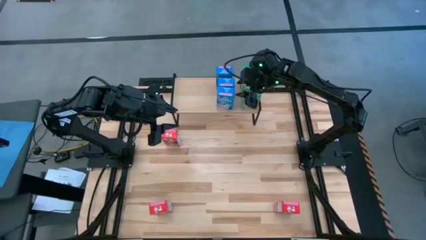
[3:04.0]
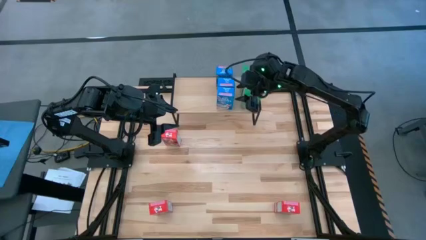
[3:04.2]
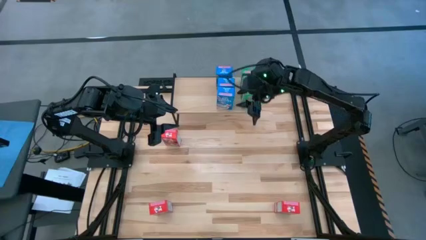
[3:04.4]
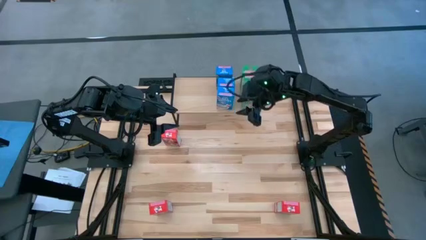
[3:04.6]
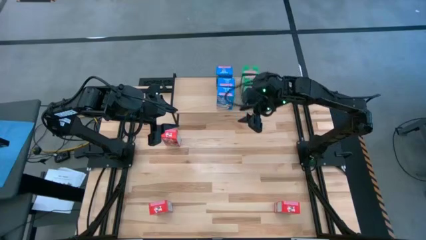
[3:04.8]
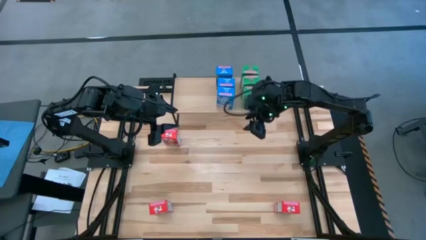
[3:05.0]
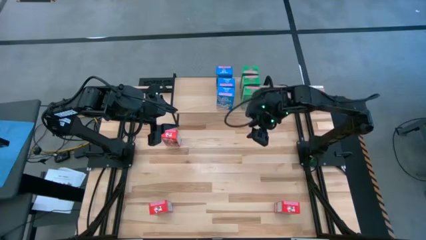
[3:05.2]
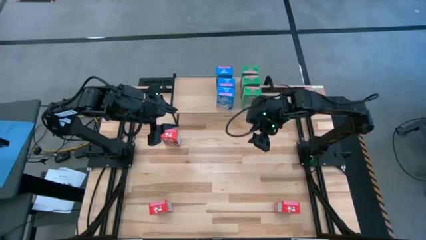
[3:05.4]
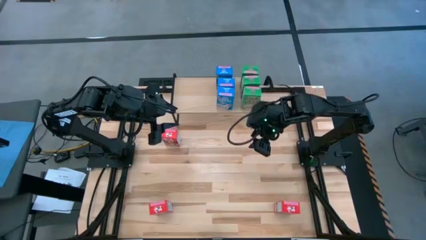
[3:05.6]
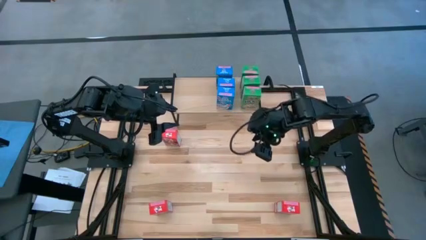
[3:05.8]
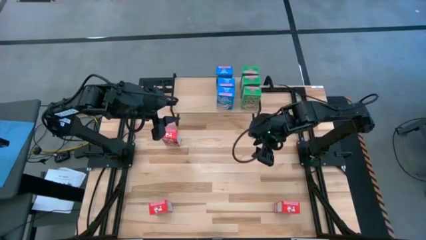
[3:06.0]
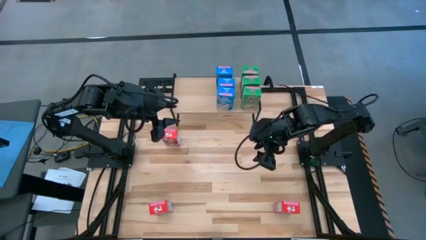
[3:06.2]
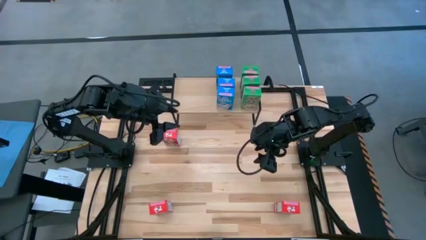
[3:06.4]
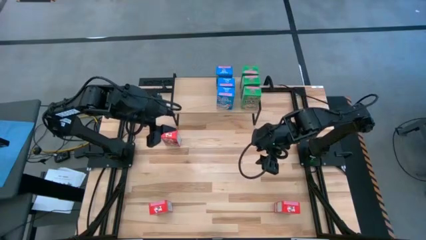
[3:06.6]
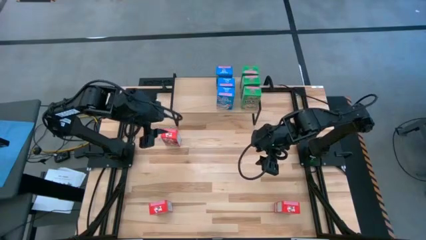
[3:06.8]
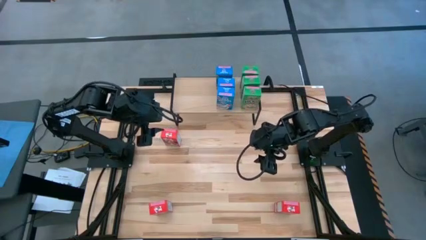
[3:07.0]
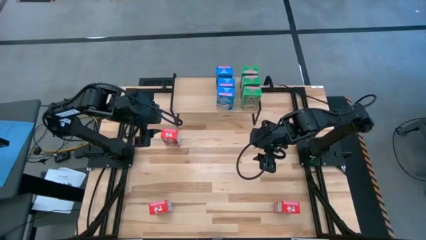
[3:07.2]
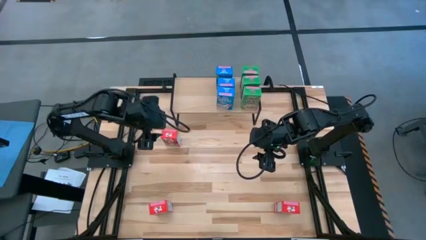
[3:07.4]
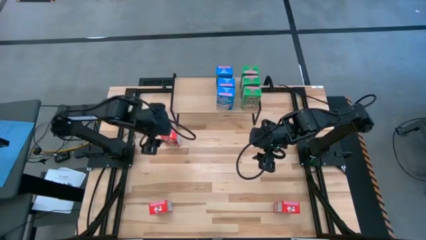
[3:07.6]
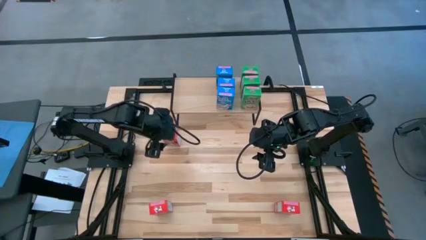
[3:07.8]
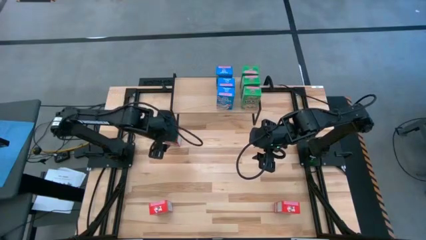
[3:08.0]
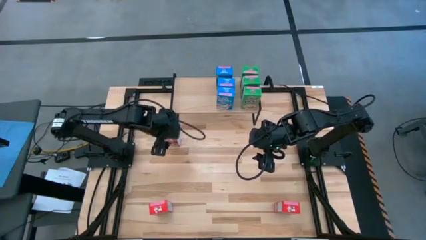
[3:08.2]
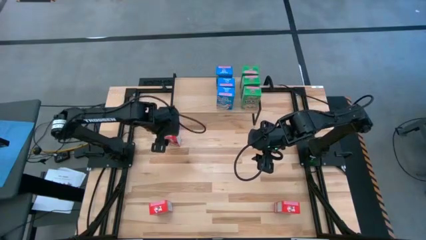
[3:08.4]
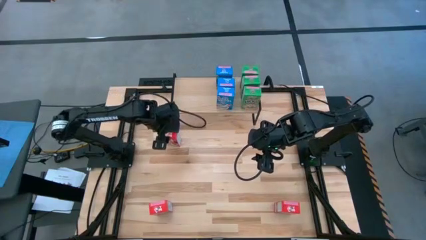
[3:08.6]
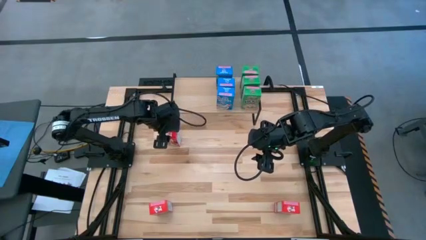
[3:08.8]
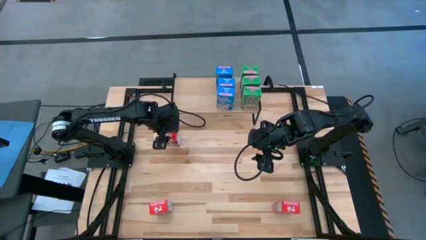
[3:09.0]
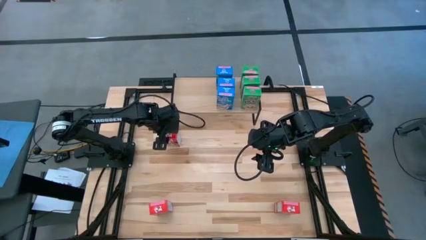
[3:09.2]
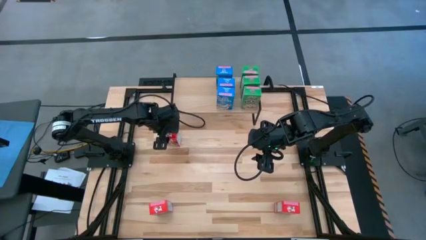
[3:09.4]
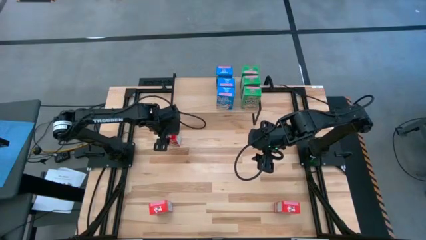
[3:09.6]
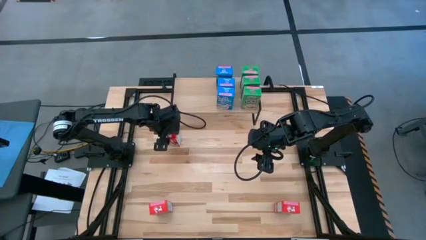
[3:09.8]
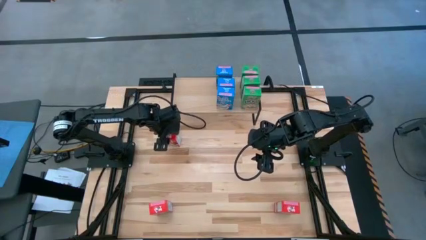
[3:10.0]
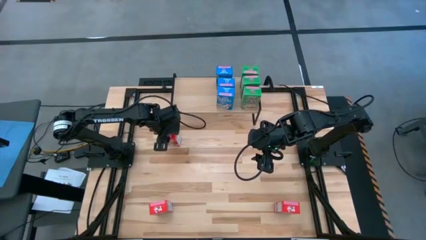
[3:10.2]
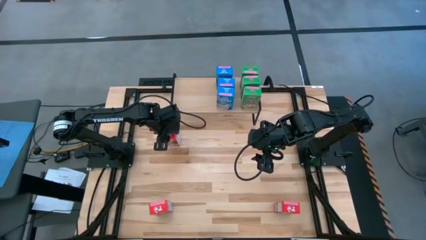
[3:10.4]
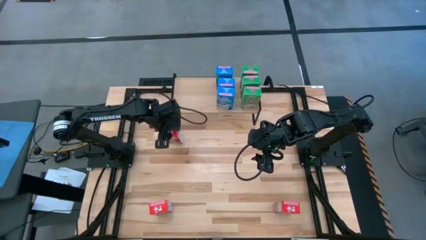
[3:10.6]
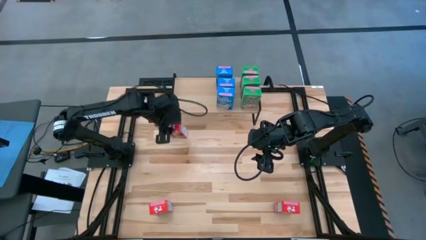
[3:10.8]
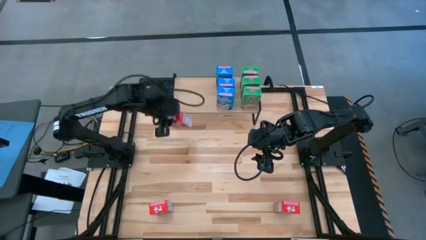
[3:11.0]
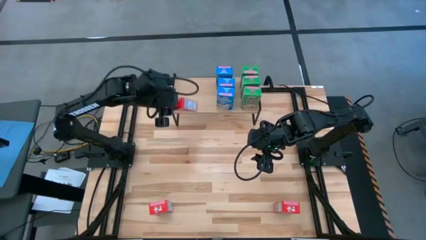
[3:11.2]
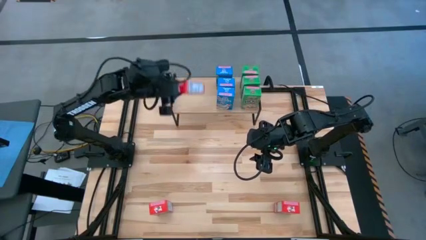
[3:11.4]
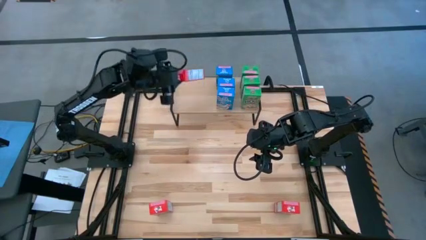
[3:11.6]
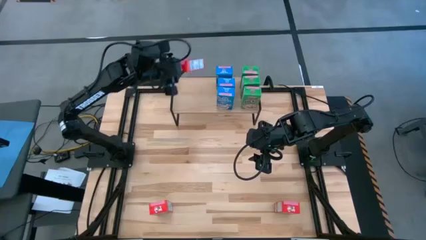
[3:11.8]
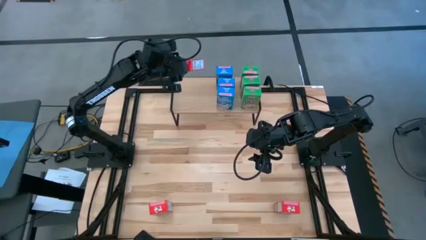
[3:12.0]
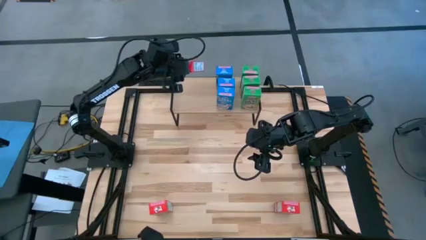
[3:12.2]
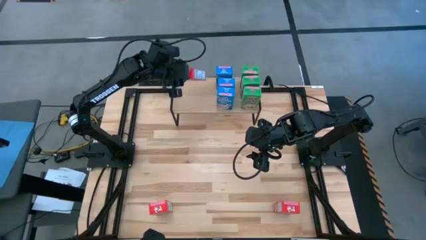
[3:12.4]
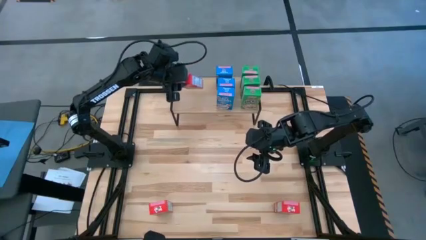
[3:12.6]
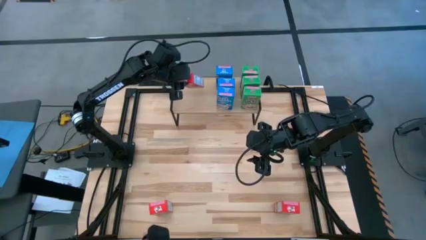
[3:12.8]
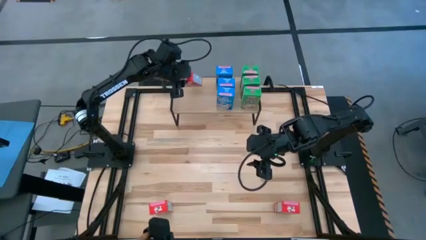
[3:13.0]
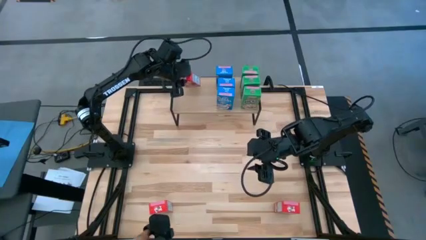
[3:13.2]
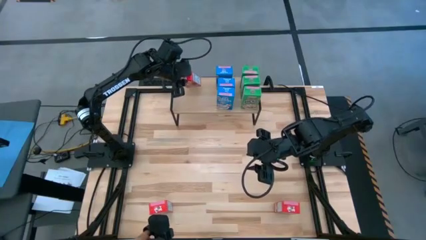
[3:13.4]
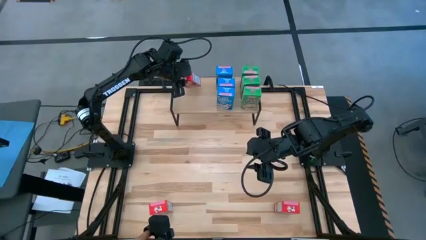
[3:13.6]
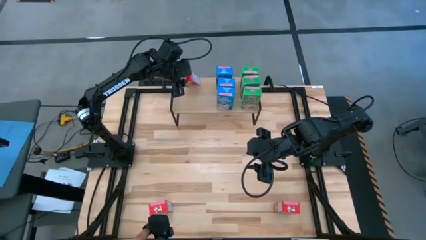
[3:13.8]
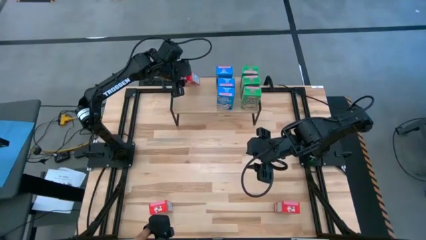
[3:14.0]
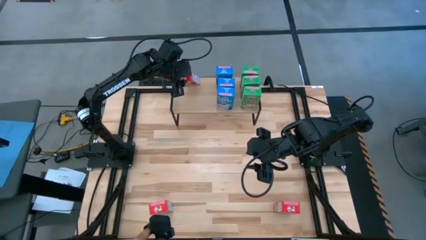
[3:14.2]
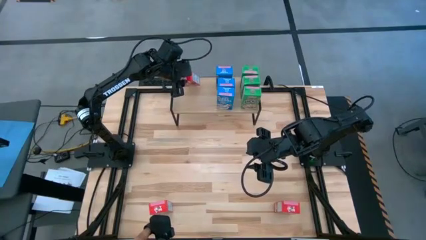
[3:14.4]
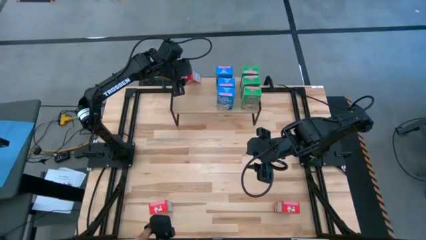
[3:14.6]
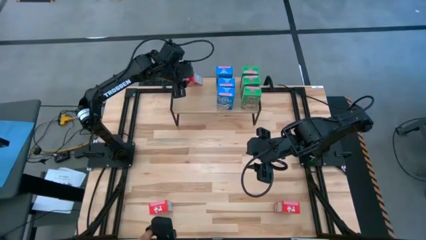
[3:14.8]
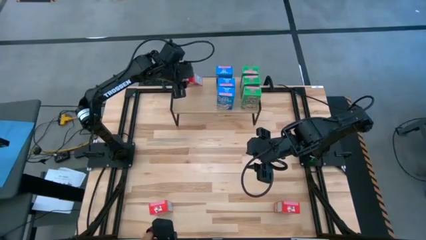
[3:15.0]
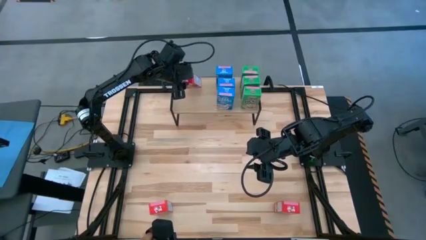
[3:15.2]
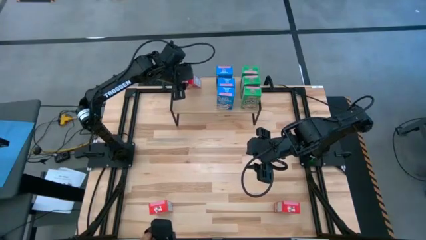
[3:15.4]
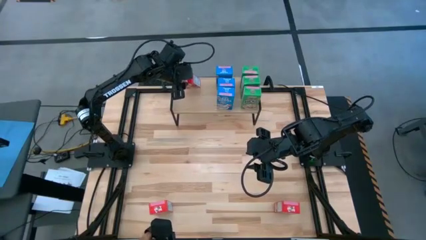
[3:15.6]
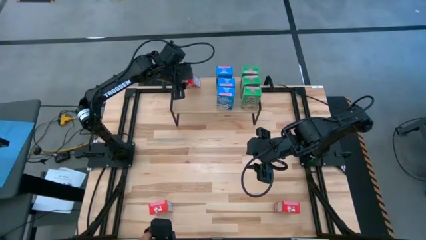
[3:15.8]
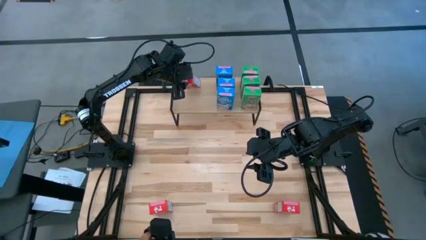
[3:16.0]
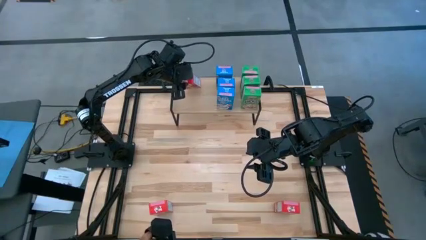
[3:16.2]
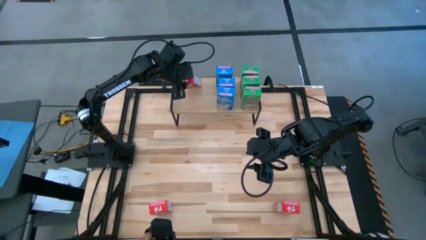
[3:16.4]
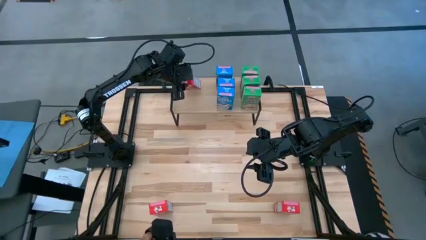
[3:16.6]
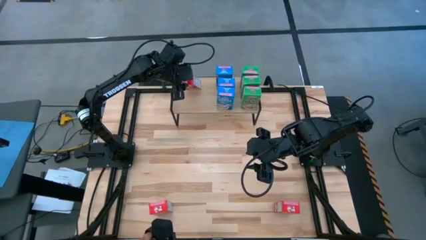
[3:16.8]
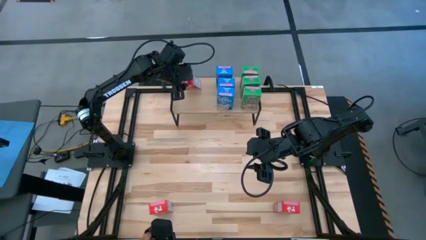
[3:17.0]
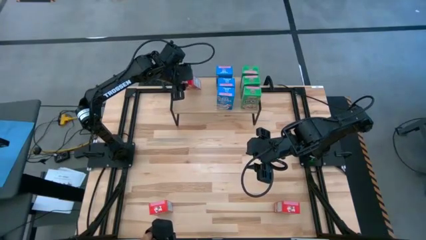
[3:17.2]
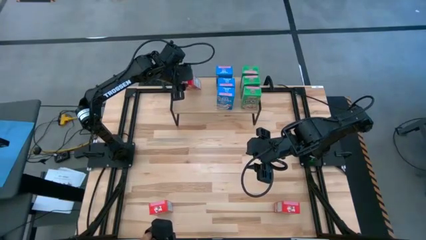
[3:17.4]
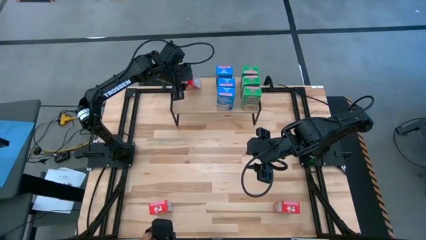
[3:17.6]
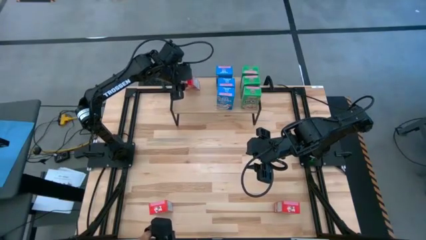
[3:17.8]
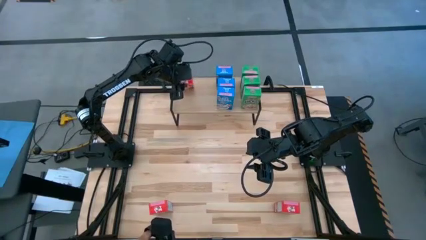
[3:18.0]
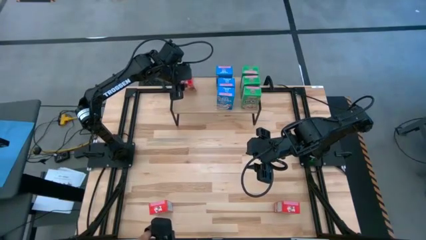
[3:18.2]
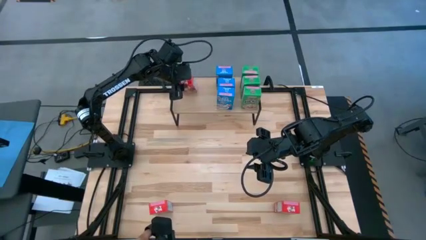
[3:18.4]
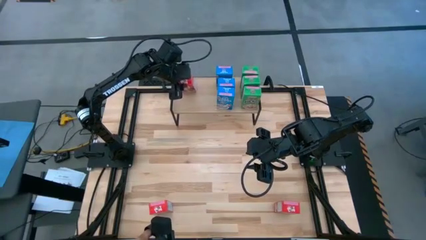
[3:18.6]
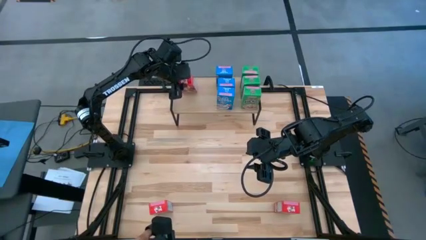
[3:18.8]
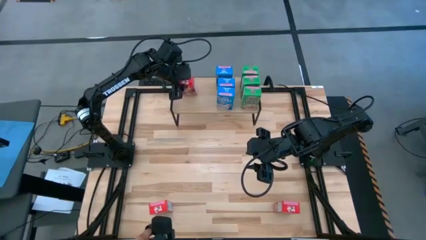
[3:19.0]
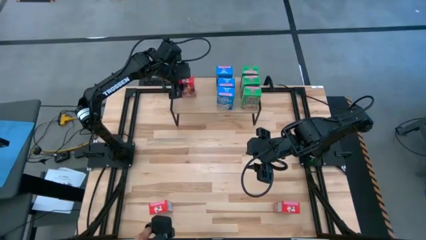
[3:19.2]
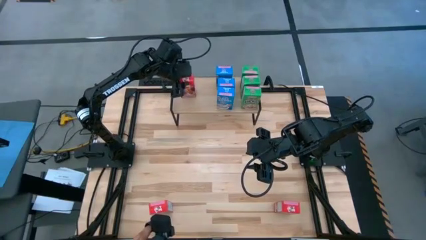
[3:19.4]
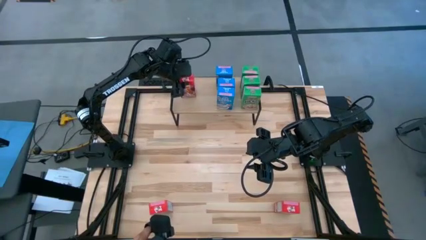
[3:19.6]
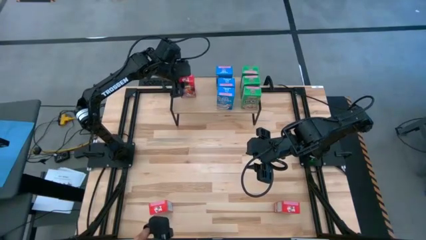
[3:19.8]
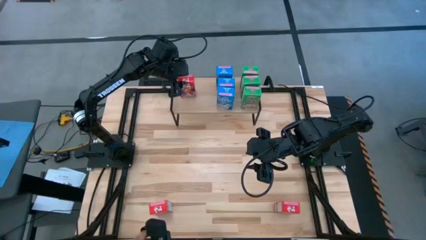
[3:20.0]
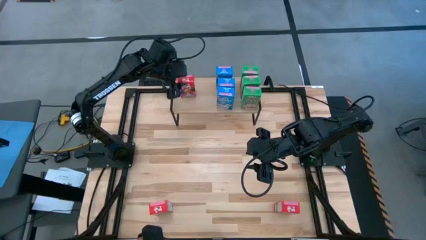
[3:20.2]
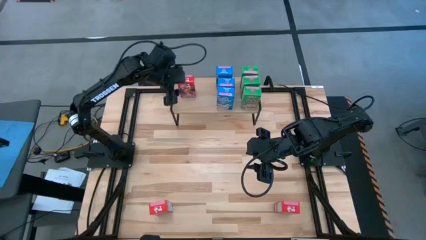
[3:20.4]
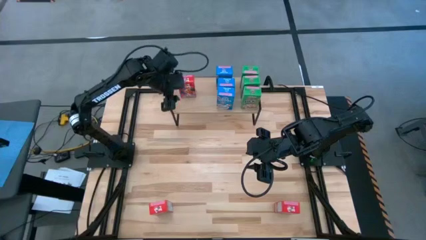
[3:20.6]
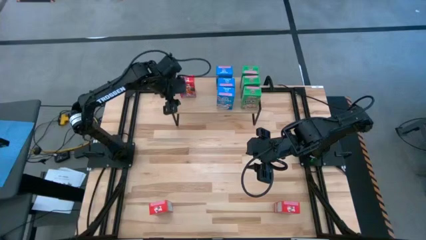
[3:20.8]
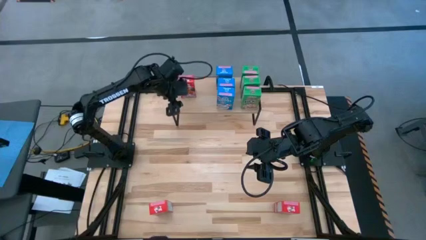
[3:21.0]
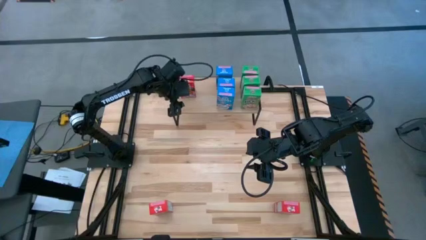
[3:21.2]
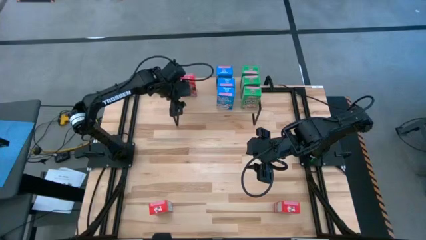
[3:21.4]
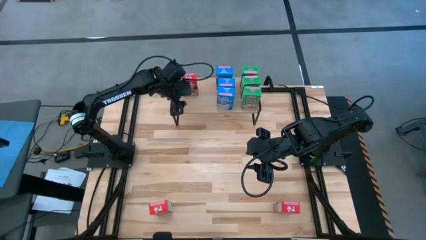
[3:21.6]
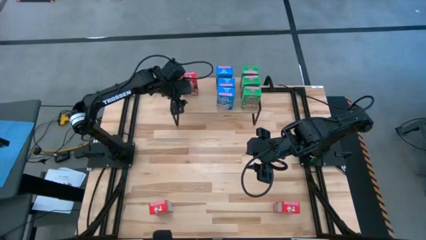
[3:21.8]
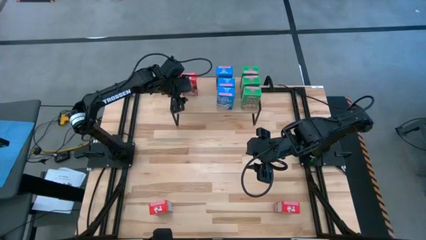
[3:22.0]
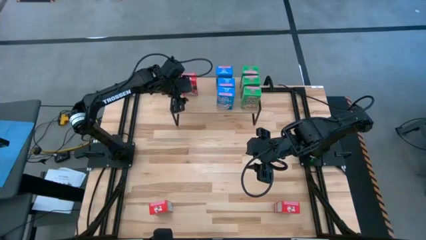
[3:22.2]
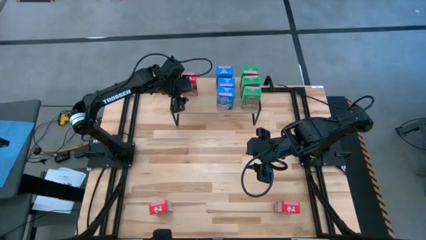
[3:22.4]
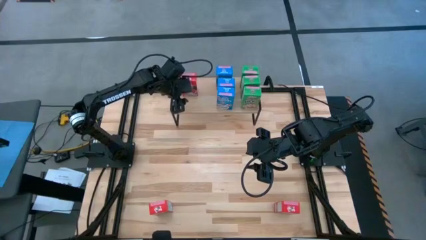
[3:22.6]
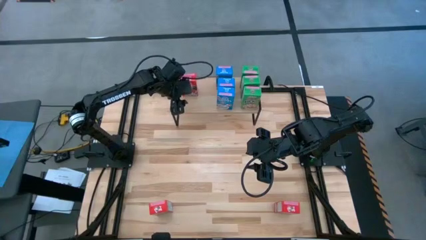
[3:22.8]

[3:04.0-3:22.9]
Task: Stack cereal on shelf
Put the top red cereal box on the shelf
